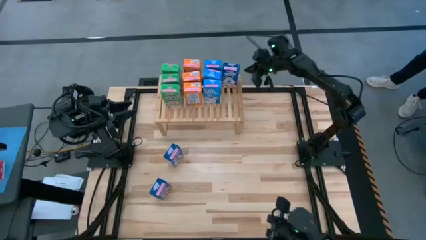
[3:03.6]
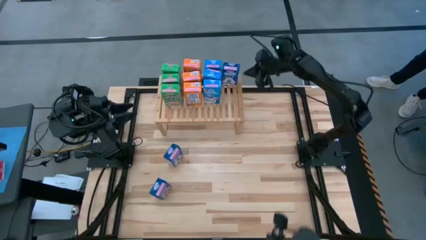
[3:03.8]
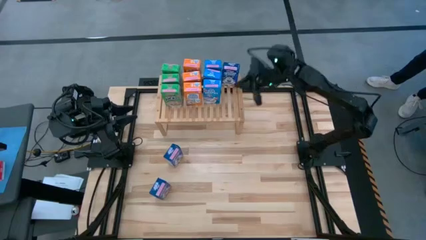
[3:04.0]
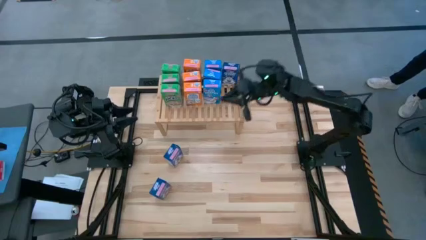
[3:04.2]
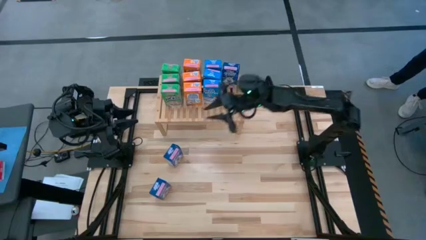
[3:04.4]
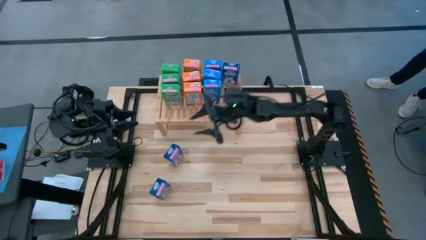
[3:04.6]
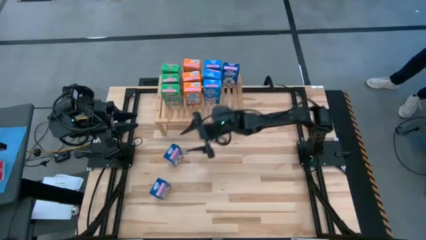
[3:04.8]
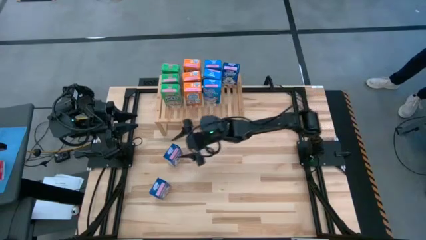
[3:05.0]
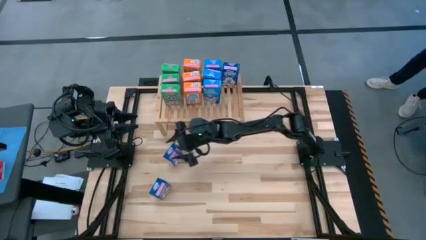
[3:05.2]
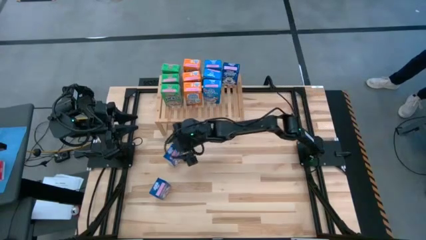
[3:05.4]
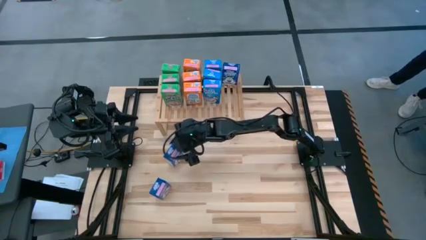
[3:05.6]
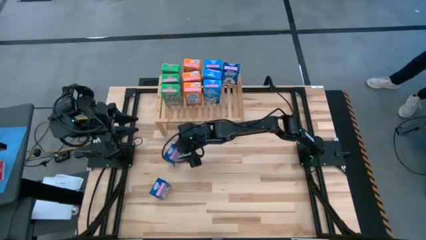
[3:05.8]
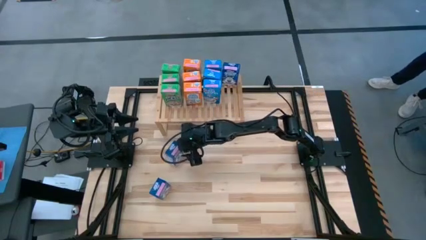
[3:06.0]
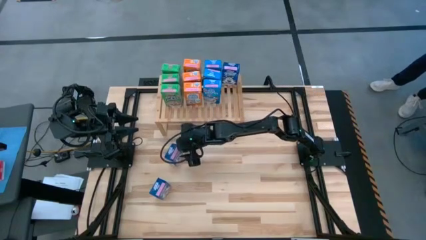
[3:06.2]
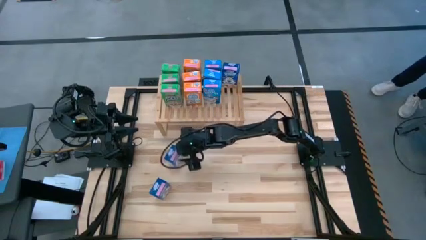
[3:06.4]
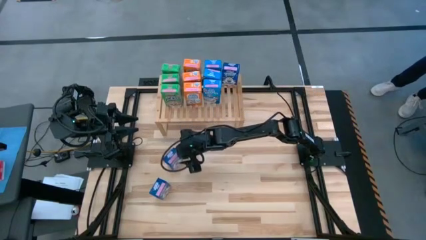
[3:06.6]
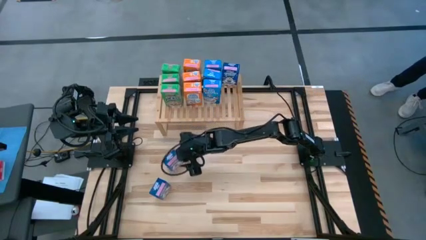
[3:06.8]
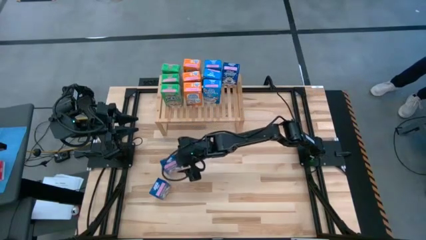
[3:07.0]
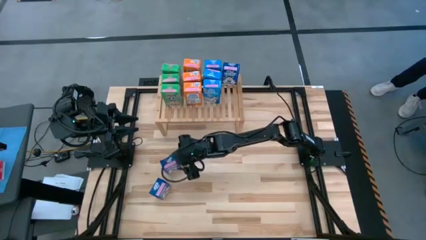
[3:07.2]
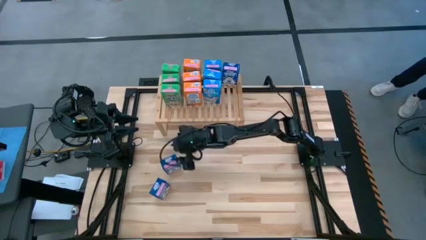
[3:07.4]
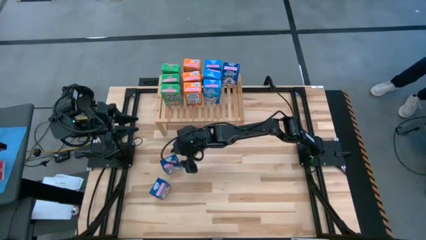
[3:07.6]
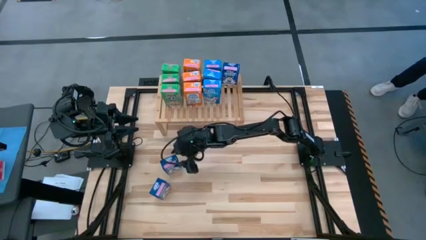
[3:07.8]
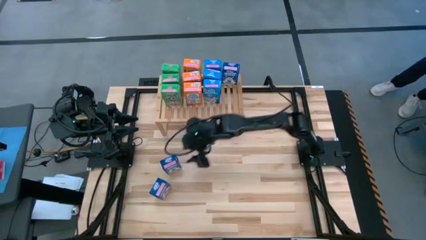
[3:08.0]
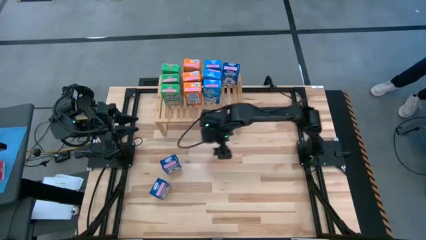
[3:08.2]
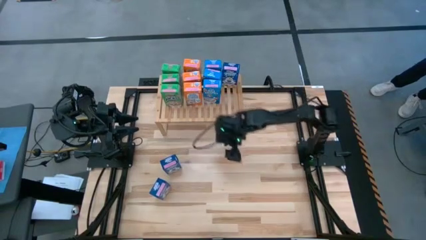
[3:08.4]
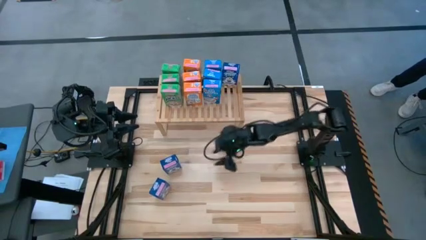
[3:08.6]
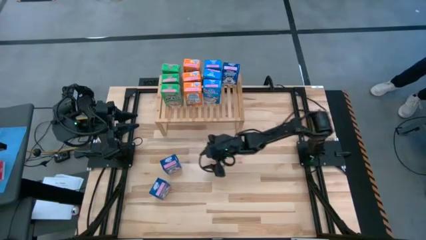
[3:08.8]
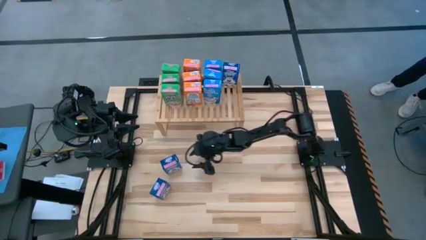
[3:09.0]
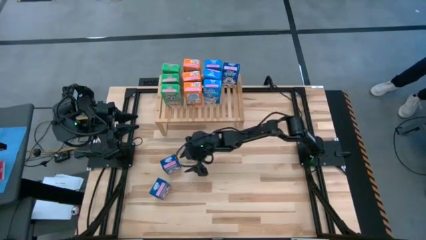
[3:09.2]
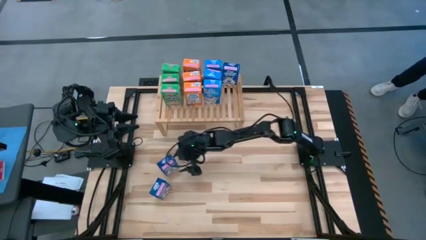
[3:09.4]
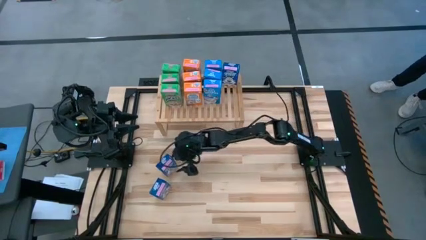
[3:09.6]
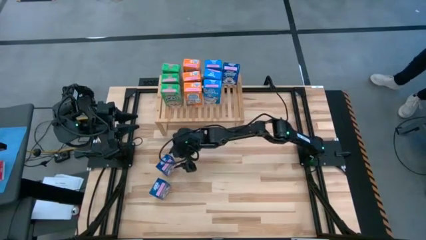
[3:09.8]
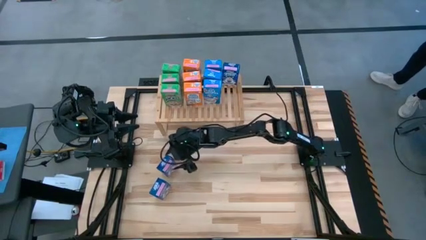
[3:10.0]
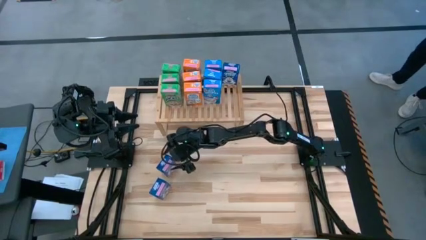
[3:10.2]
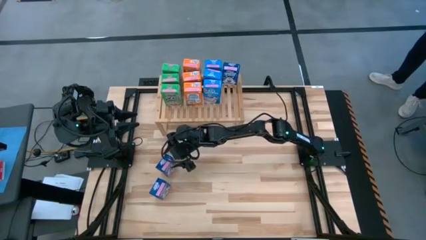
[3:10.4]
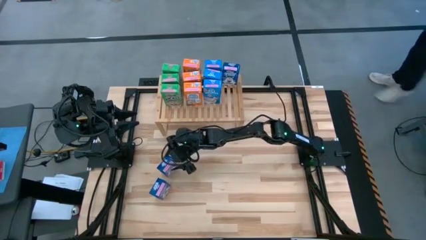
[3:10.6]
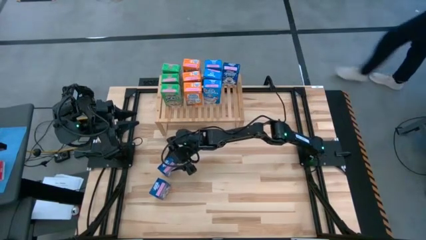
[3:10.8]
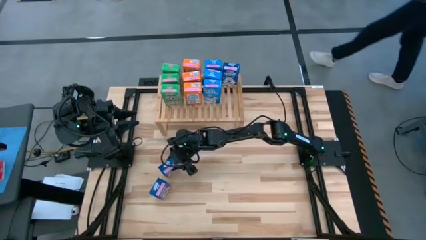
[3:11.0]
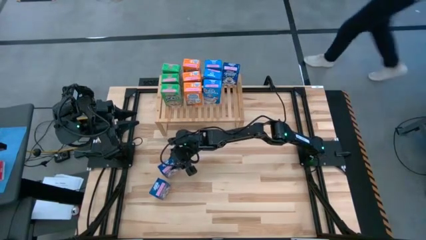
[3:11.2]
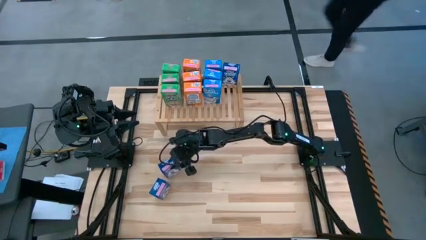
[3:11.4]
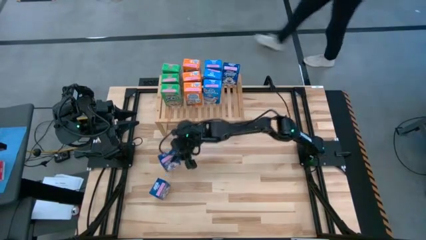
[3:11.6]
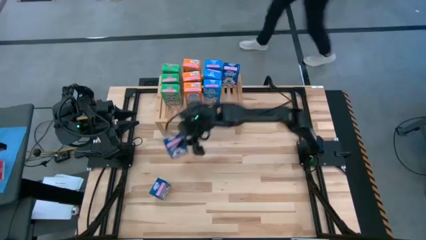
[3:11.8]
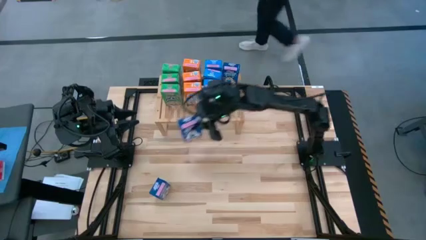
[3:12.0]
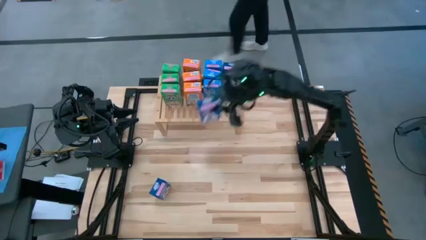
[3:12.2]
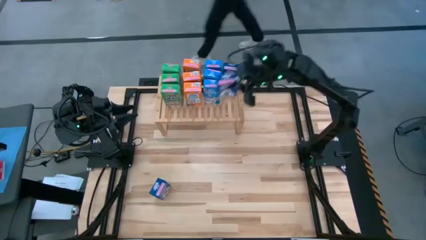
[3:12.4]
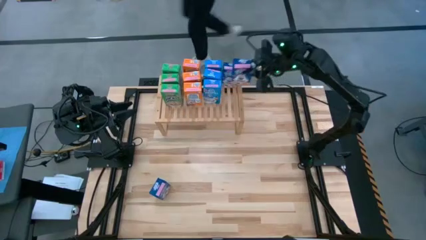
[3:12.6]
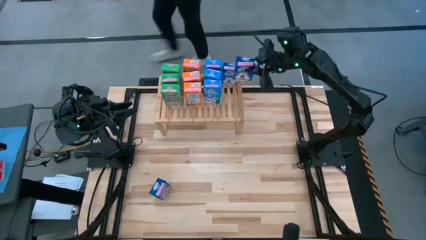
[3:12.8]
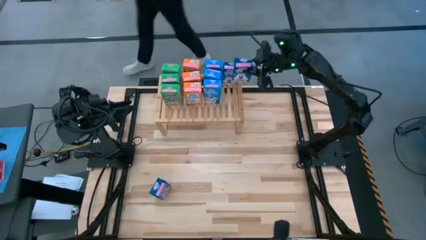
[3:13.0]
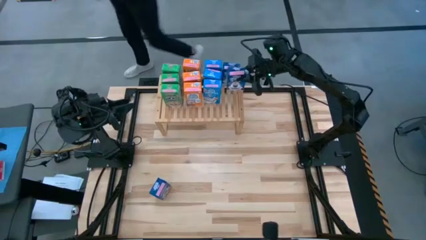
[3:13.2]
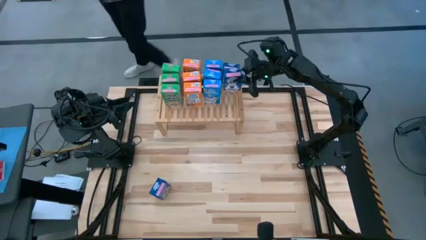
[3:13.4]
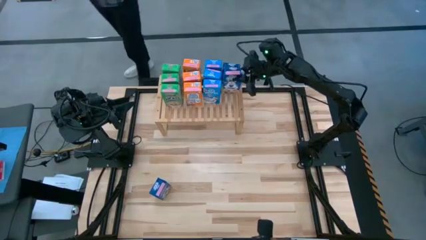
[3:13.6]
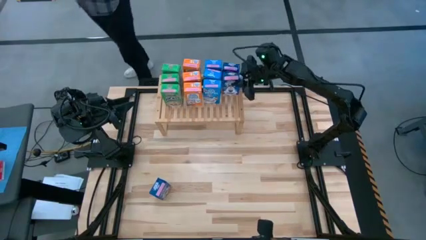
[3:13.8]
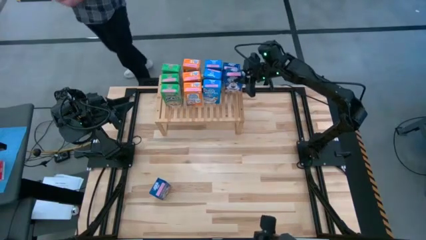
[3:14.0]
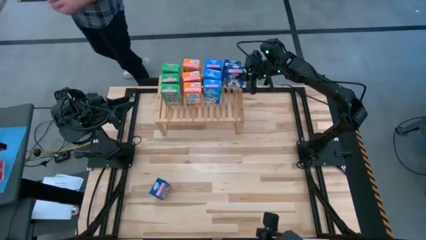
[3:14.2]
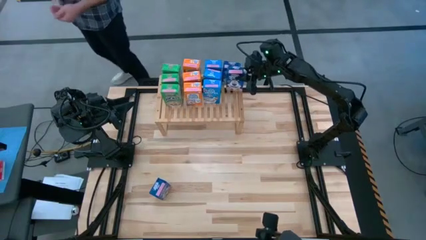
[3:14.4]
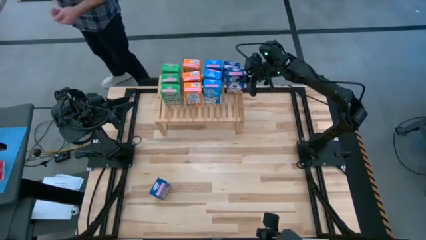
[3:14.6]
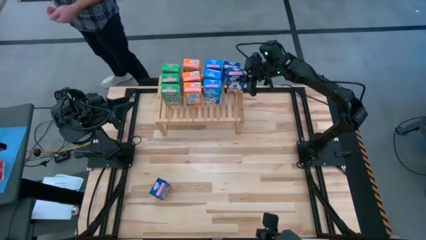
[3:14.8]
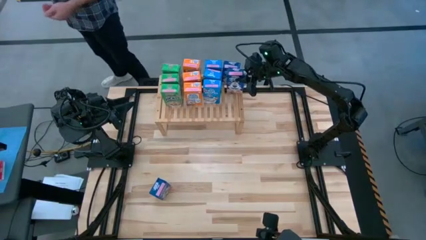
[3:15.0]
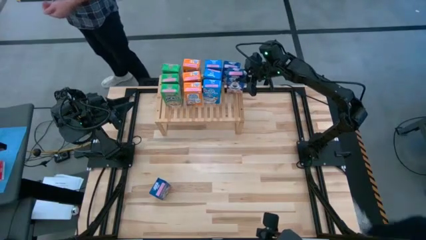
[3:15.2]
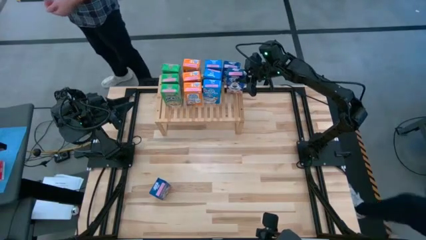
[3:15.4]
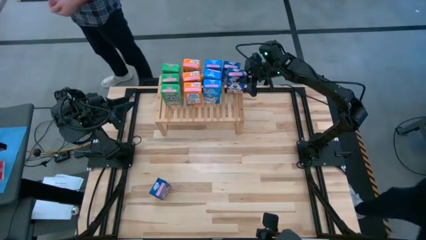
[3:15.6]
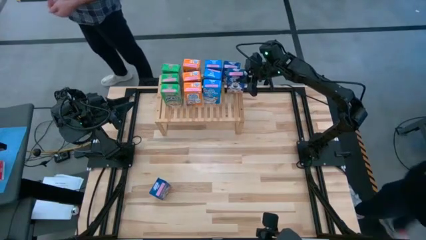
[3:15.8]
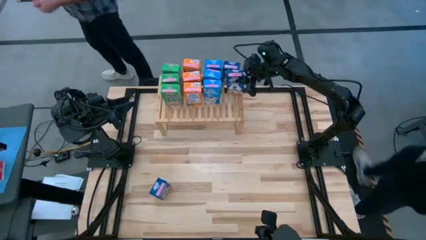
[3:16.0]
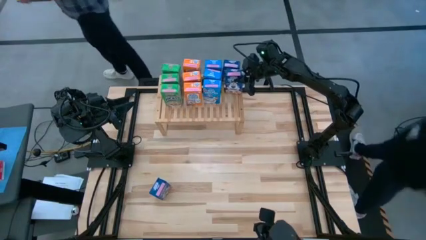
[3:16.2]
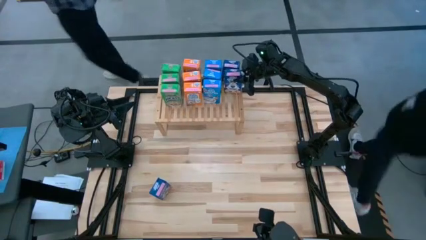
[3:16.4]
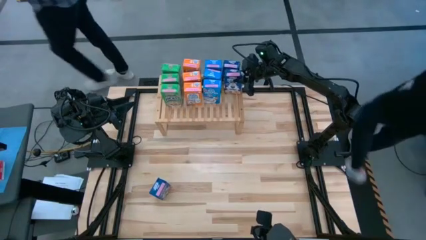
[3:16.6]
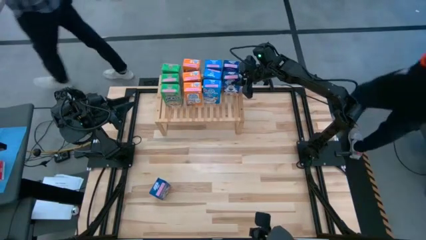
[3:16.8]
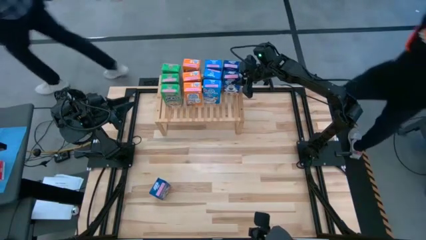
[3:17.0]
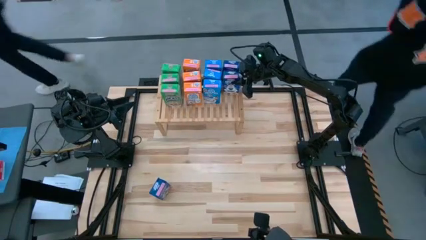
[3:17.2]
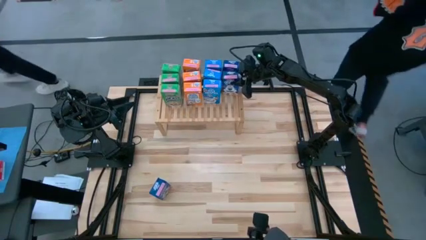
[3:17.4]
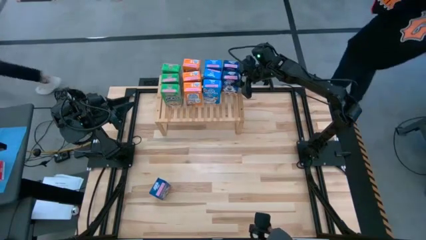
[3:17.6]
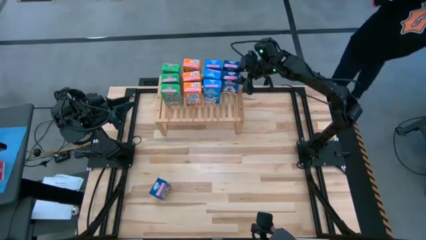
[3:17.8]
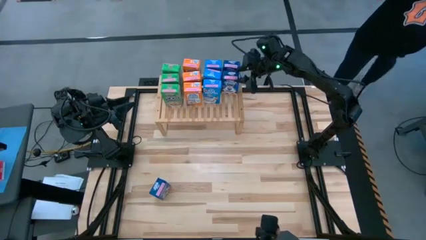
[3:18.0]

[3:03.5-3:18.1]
Task: Stack cereal on shelf
Put the top blue cereal box on the shelf aligned with the other blue cereal box
